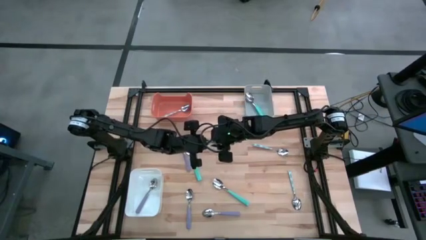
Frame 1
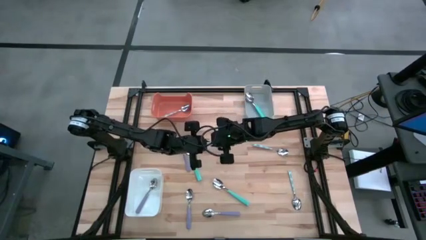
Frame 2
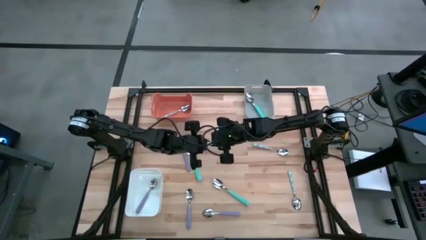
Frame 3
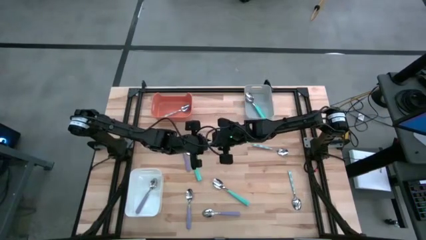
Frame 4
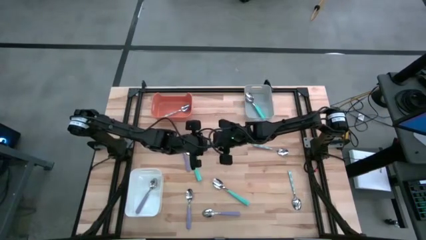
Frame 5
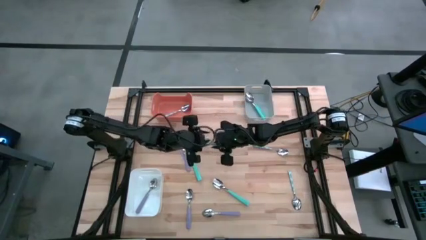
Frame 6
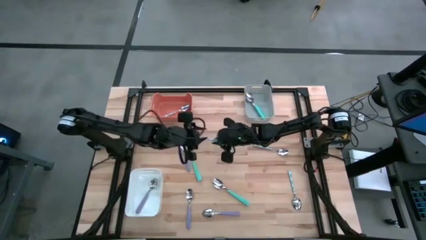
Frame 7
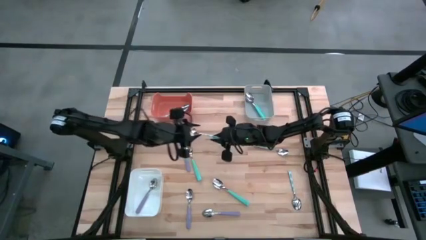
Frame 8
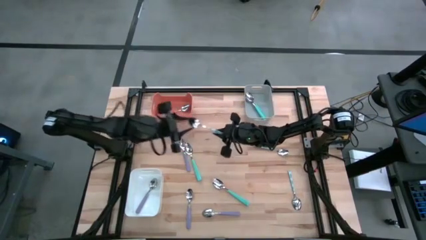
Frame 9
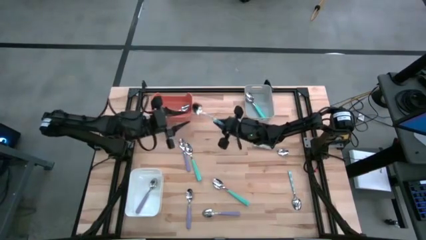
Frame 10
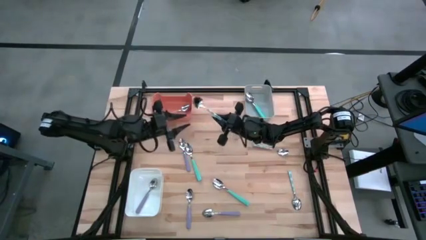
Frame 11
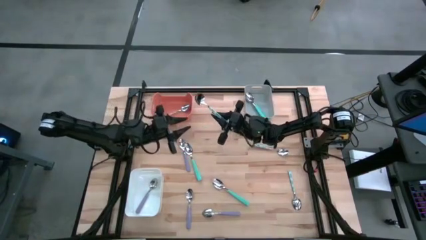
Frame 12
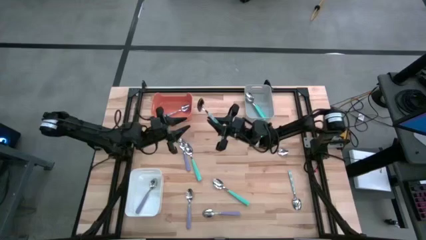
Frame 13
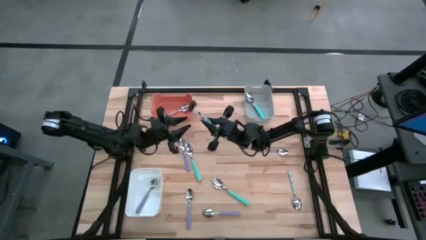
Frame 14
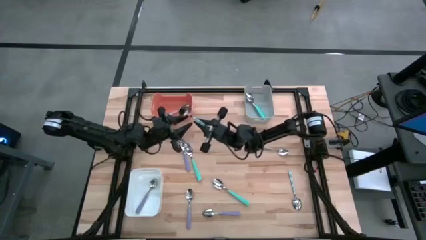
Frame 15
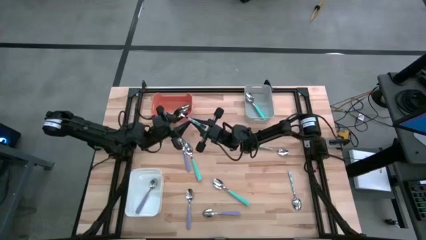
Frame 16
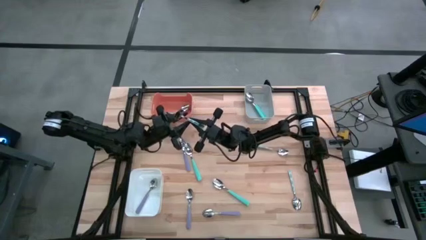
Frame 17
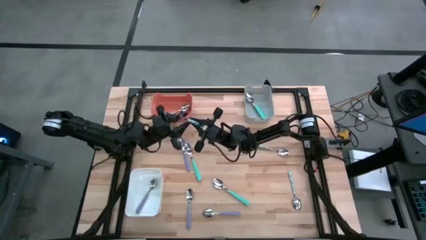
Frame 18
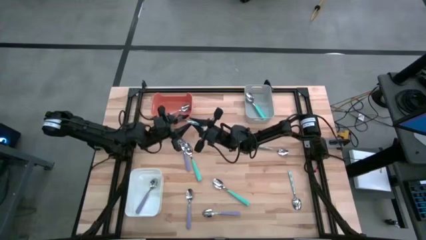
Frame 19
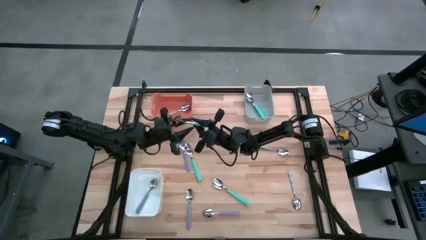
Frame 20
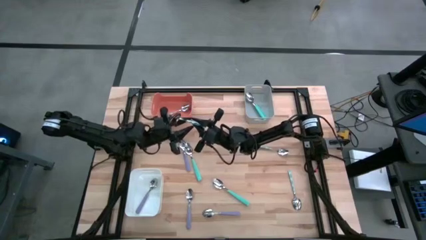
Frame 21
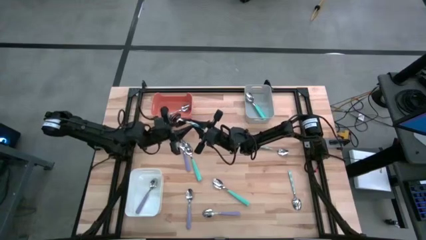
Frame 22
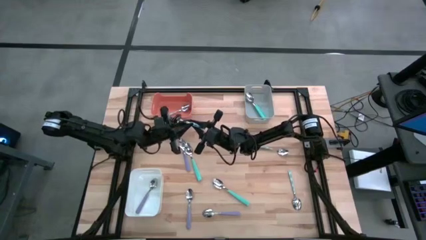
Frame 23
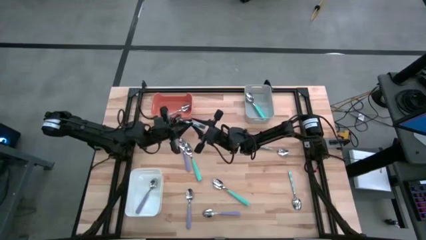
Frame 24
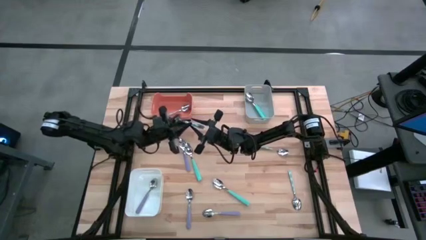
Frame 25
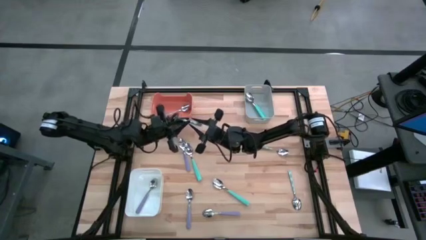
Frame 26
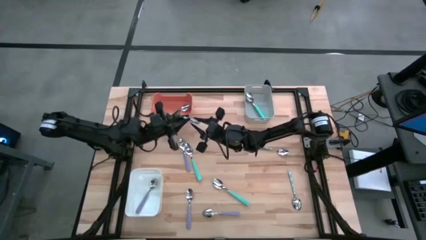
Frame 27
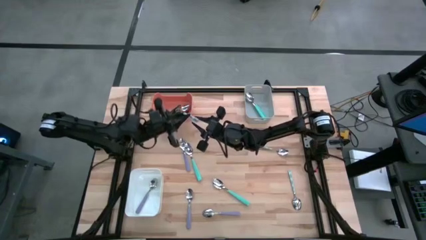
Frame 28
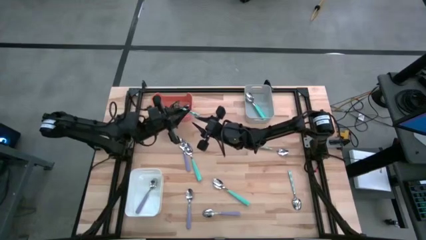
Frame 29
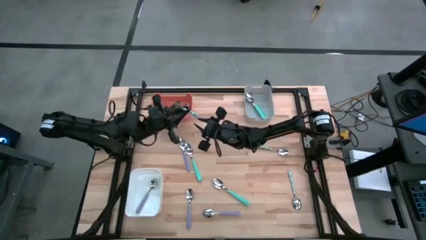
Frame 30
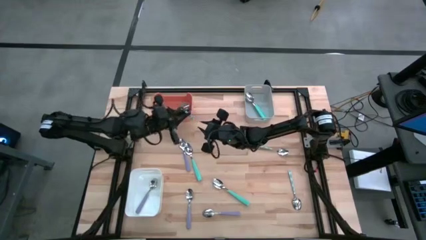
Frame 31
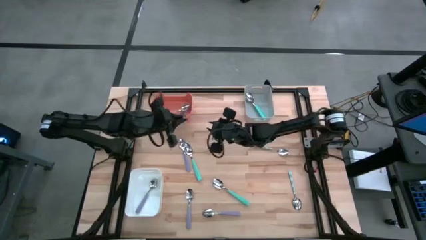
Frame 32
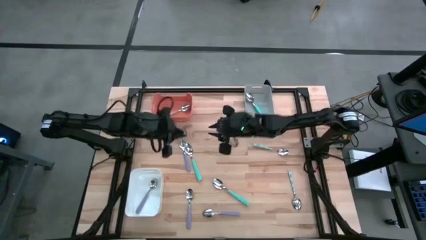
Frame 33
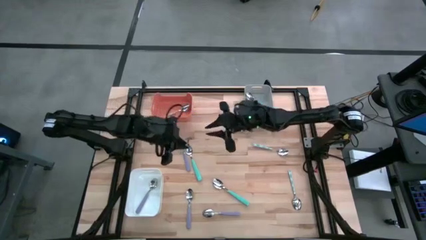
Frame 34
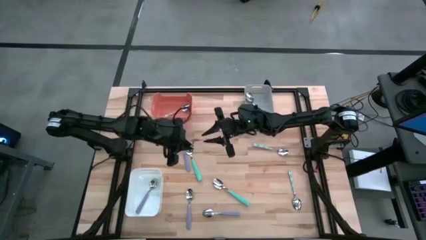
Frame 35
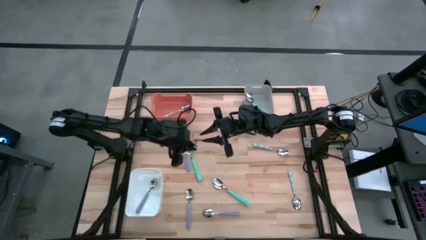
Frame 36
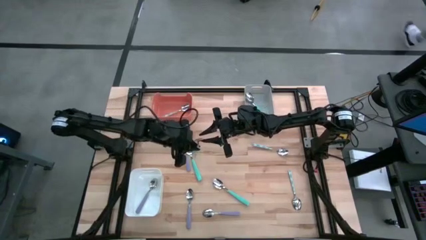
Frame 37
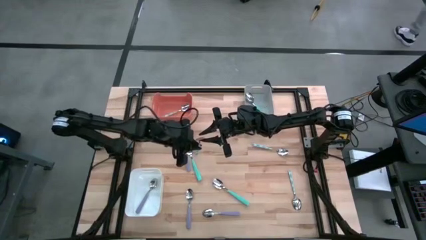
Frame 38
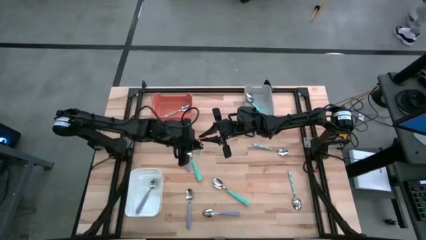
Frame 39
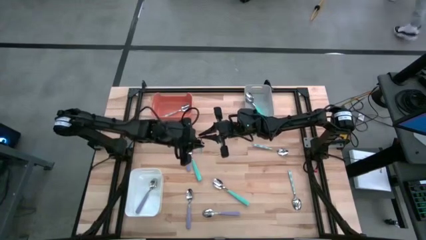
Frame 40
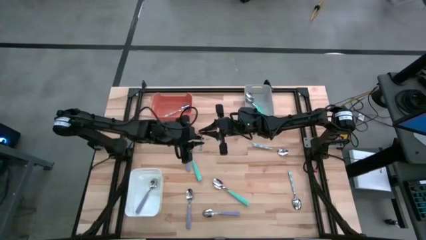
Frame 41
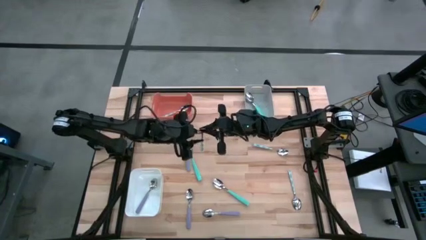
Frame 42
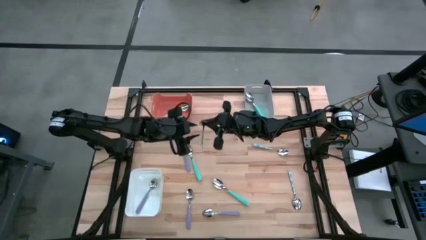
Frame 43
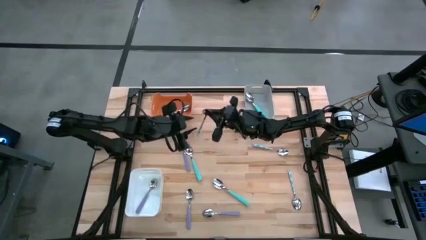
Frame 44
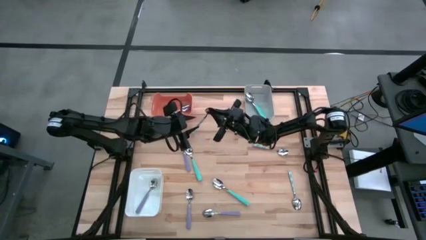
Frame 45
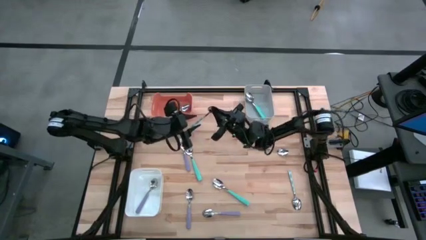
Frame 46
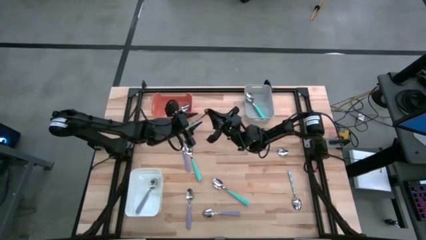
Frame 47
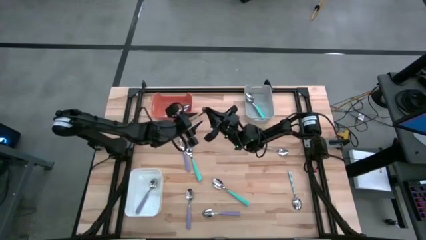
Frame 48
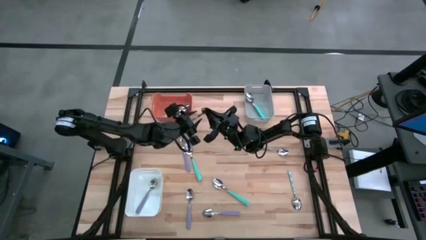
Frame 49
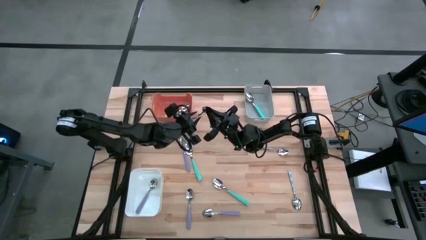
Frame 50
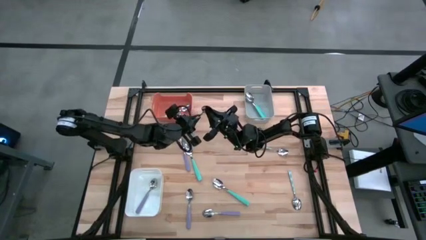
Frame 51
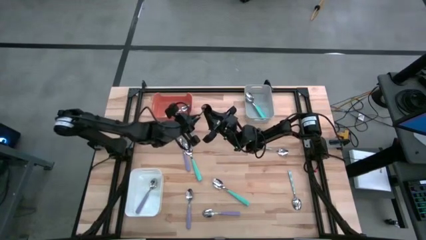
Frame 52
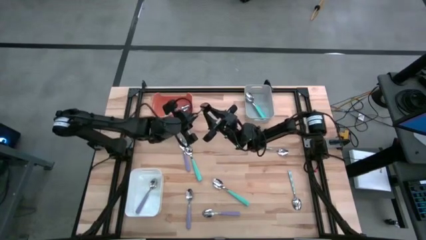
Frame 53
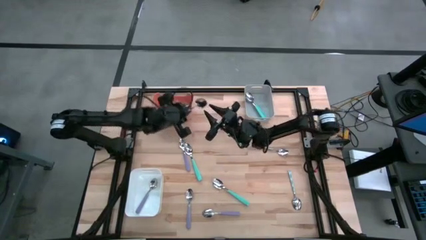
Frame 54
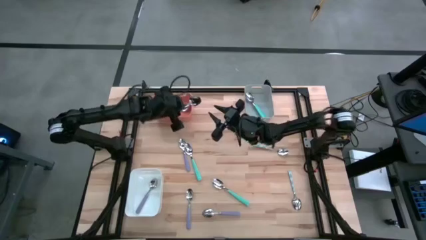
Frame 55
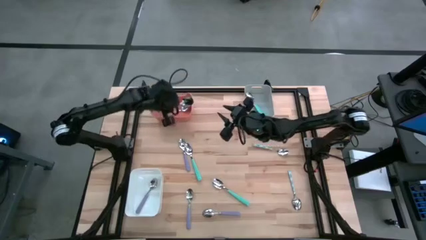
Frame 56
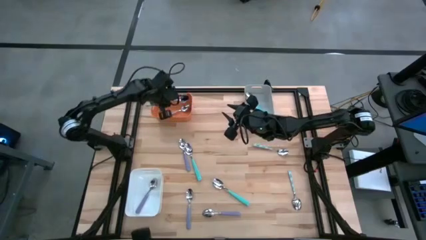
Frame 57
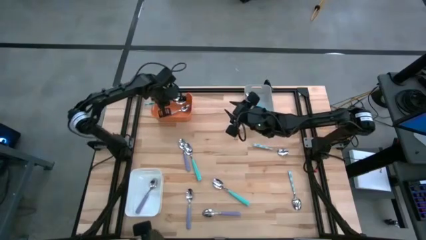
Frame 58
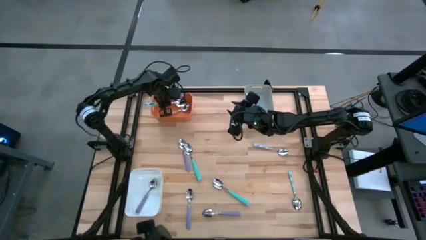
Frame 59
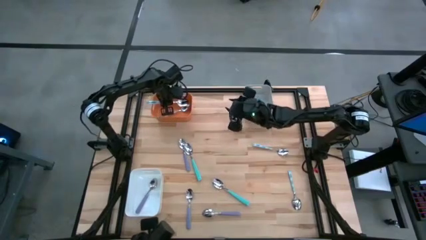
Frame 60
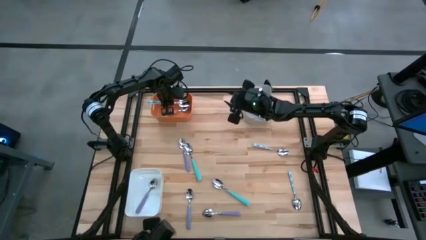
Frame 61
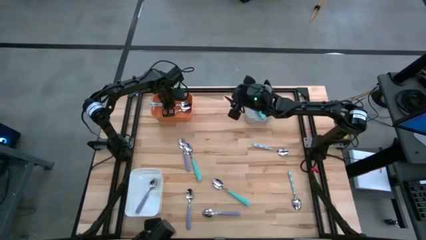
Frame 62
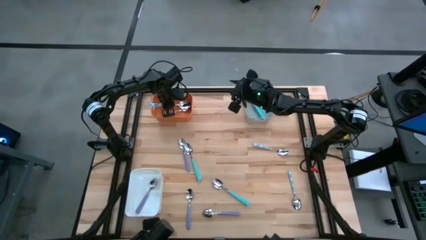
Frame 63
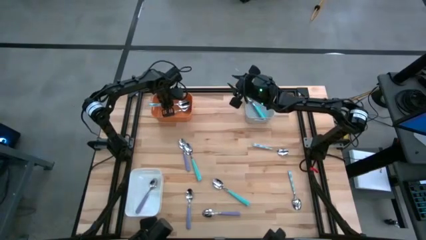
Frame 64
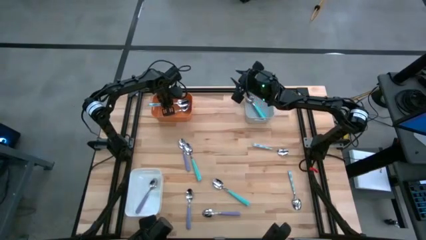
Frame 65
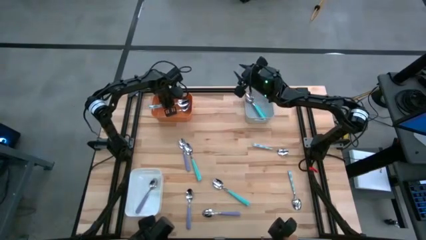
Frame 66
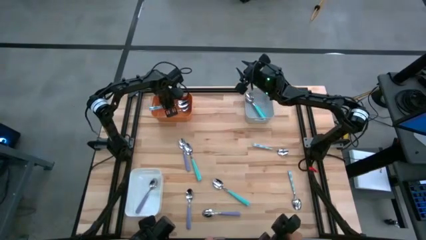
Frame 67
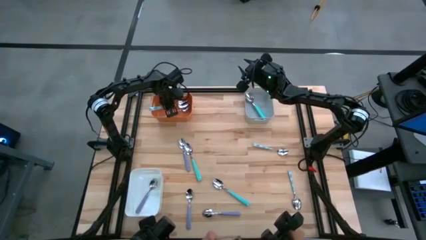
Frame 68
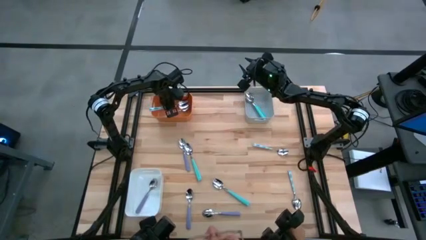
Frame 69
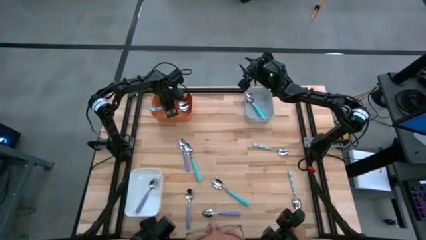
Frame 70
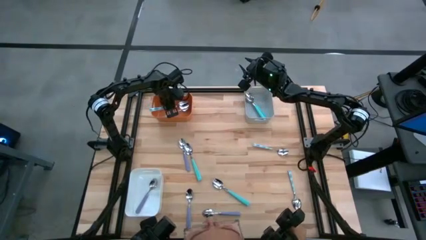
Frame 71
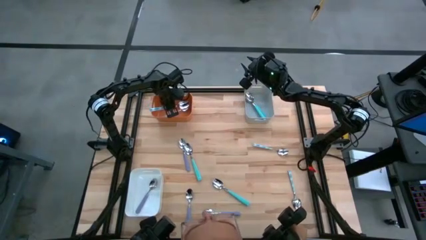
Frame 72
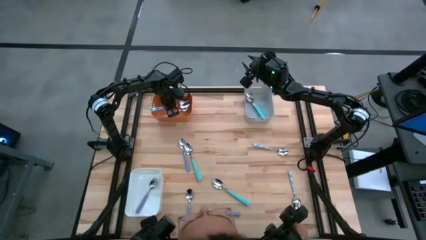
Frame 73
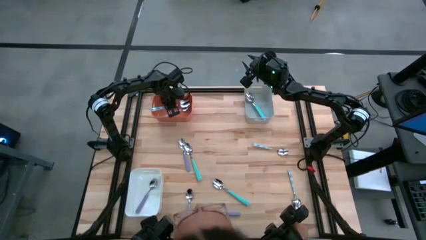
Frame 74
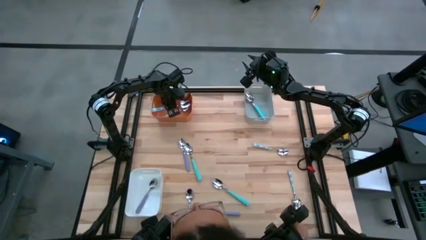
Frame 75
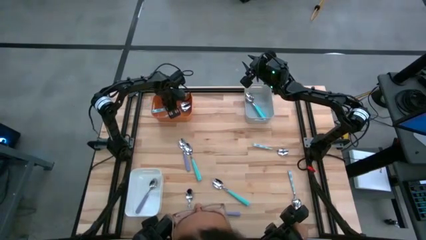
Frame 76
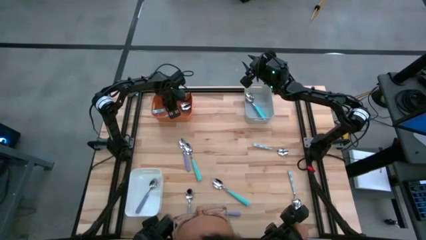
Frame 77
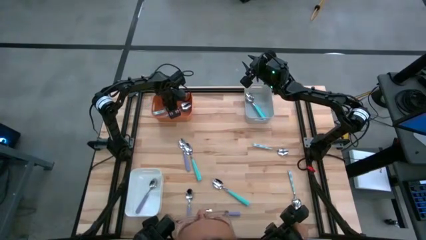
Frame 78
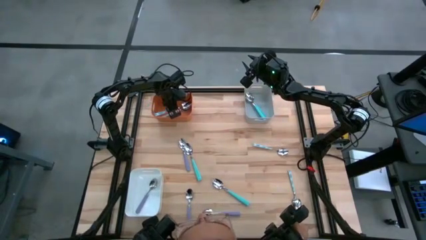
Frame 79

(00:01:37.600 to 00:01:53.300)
Task: Sort silverware by color (type)
Put the bottom left blue patterned spoon into the orange bin
